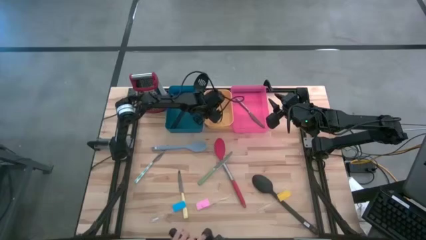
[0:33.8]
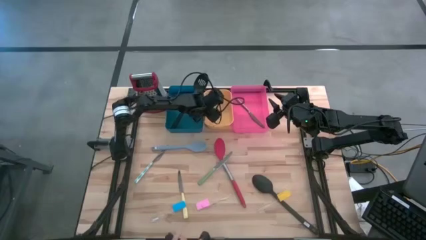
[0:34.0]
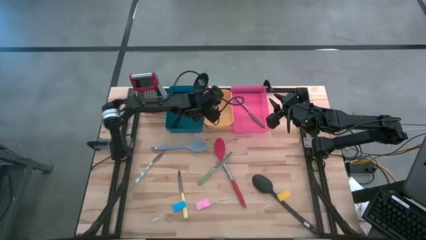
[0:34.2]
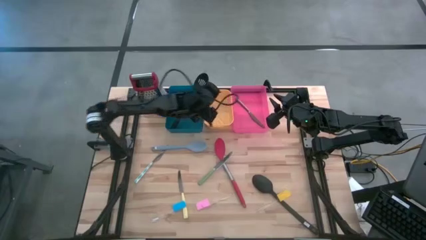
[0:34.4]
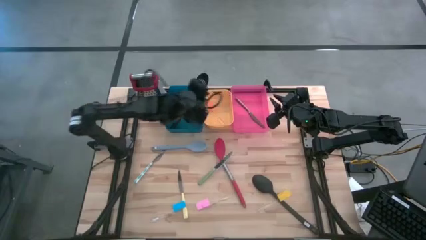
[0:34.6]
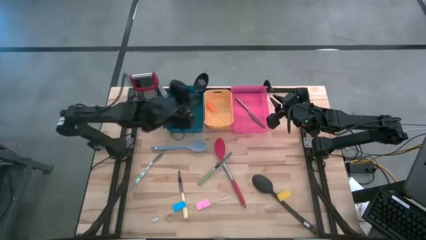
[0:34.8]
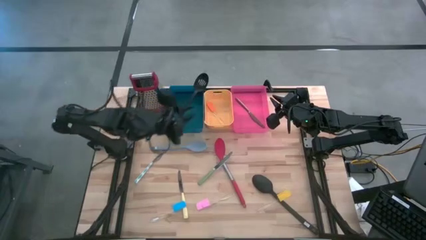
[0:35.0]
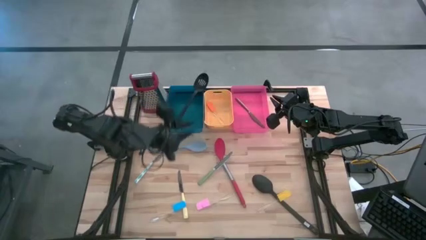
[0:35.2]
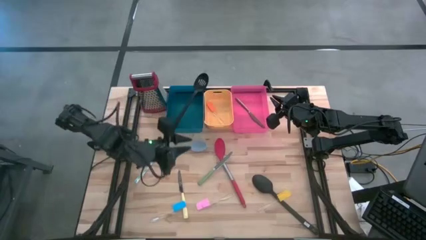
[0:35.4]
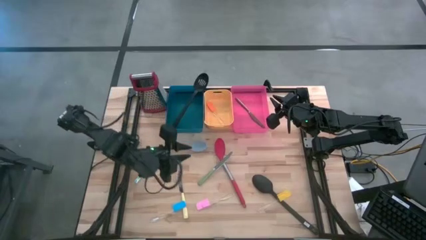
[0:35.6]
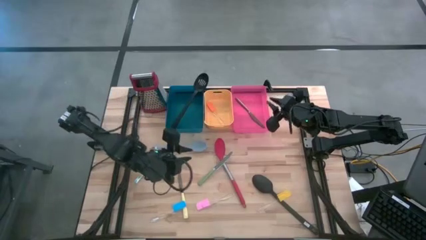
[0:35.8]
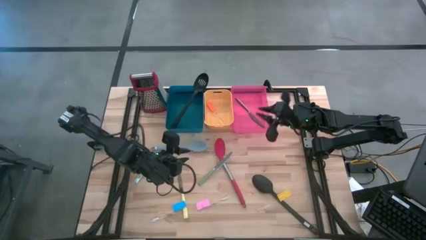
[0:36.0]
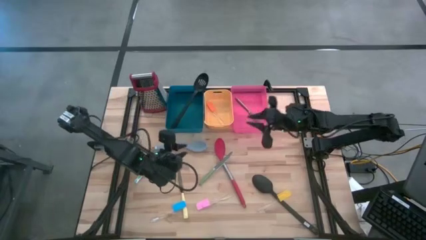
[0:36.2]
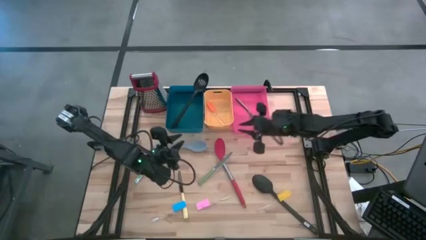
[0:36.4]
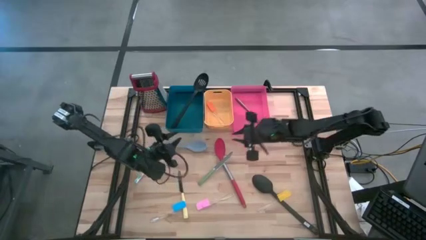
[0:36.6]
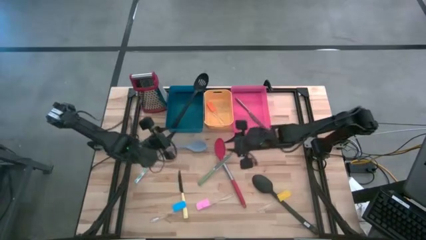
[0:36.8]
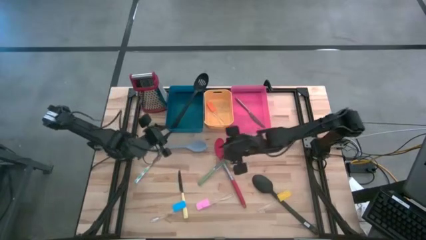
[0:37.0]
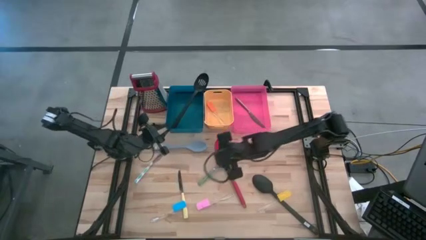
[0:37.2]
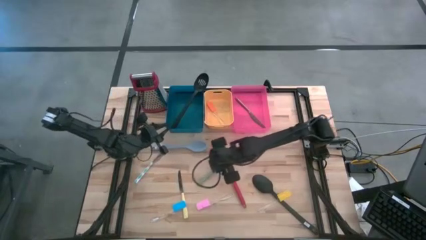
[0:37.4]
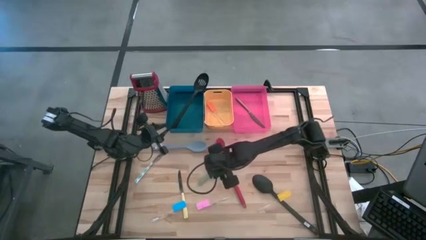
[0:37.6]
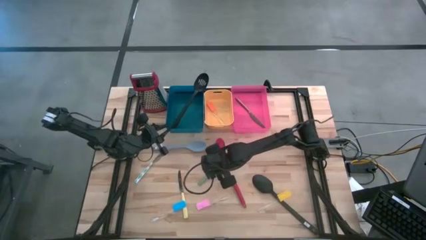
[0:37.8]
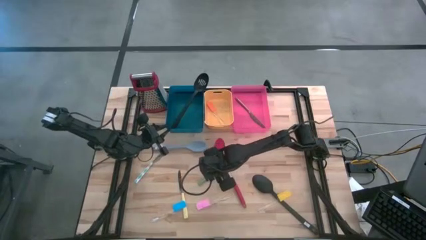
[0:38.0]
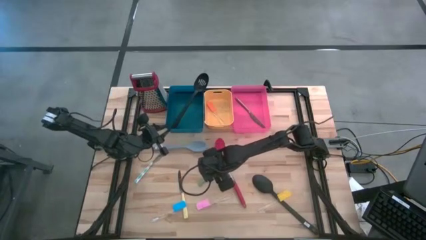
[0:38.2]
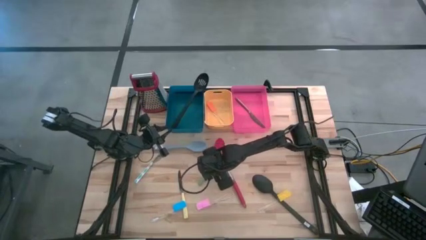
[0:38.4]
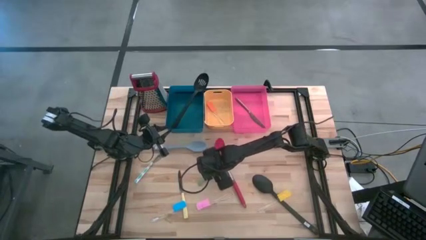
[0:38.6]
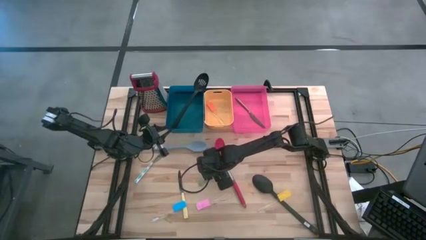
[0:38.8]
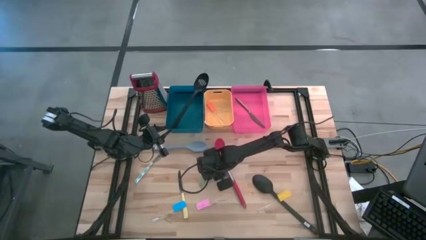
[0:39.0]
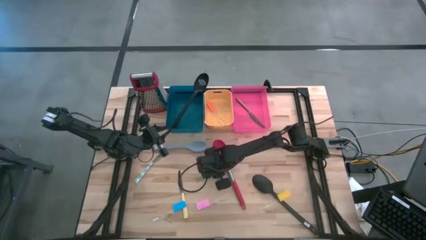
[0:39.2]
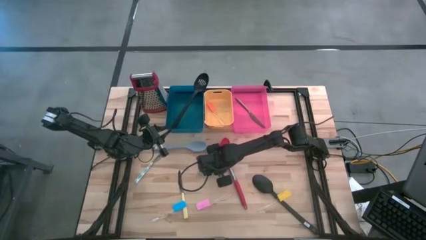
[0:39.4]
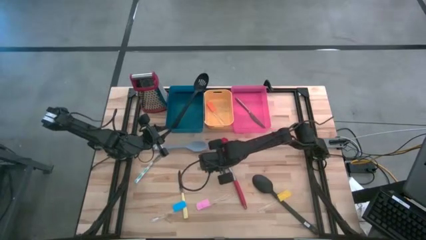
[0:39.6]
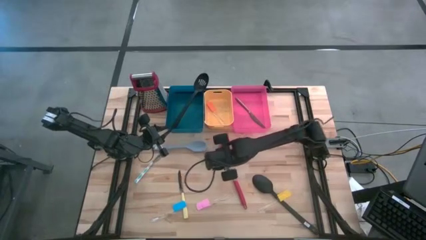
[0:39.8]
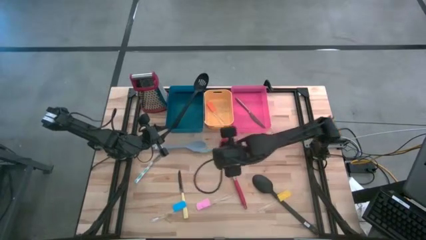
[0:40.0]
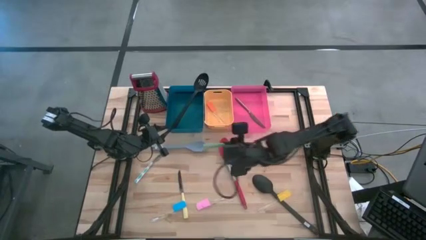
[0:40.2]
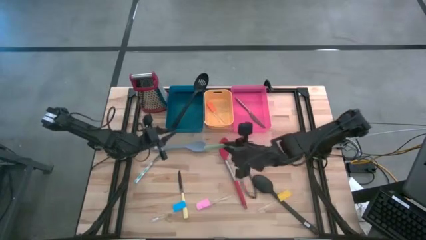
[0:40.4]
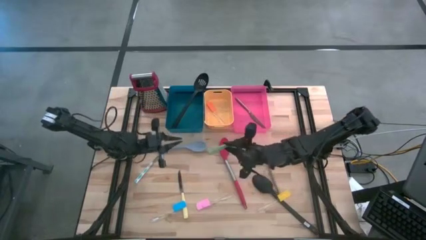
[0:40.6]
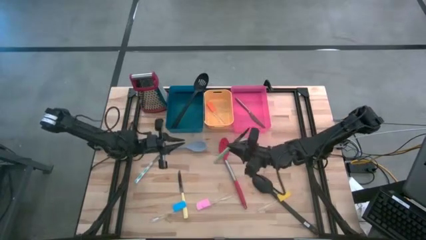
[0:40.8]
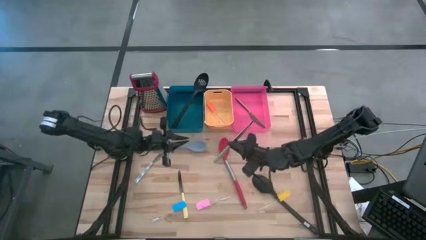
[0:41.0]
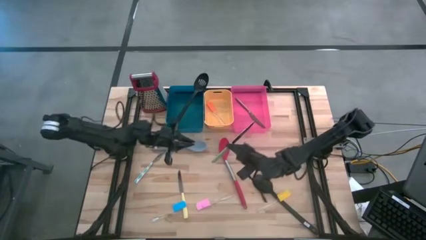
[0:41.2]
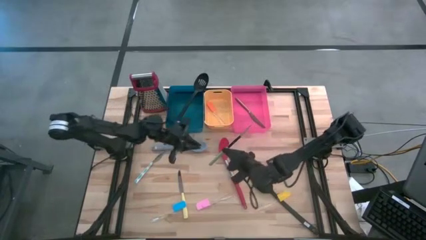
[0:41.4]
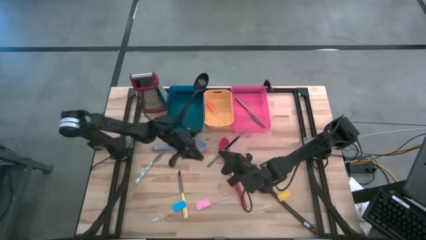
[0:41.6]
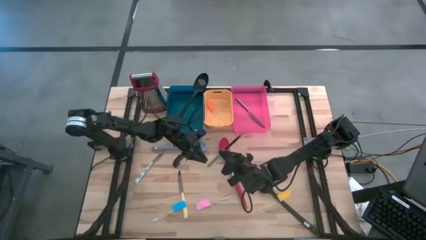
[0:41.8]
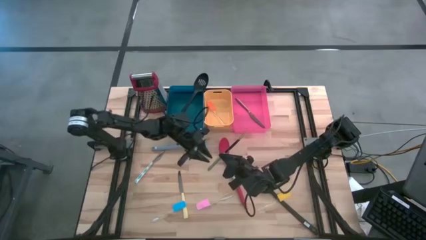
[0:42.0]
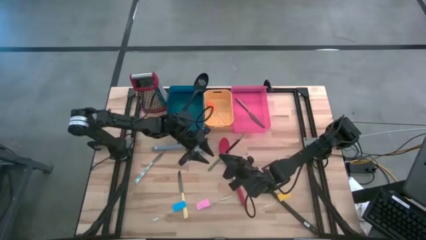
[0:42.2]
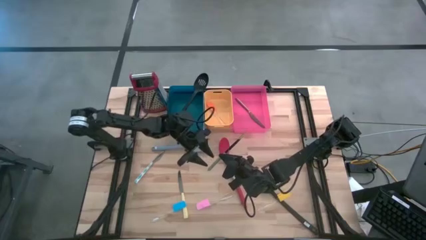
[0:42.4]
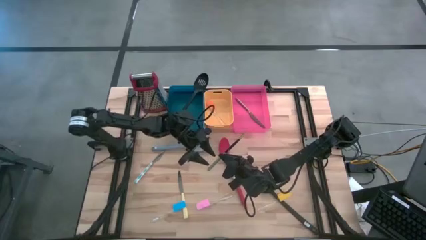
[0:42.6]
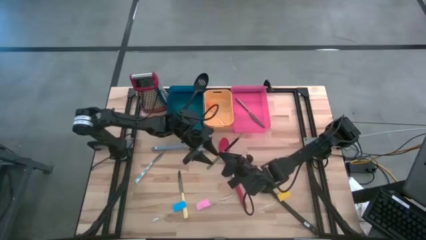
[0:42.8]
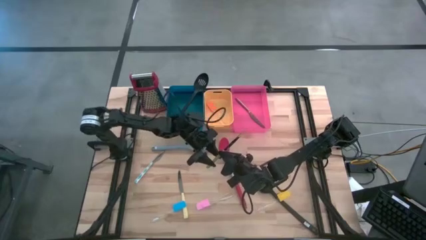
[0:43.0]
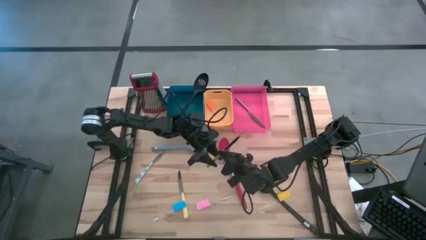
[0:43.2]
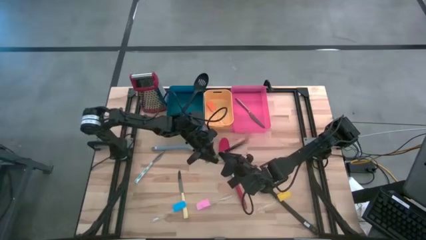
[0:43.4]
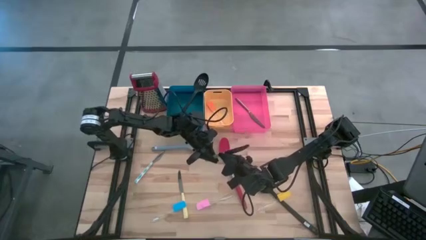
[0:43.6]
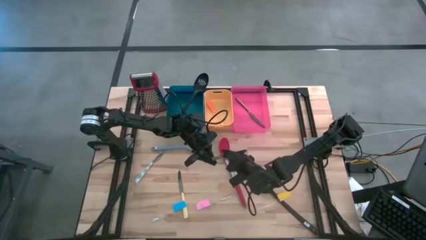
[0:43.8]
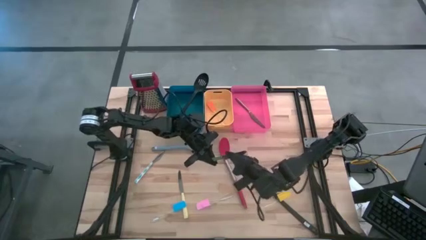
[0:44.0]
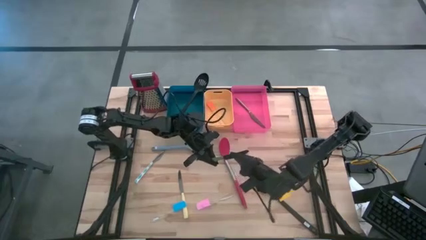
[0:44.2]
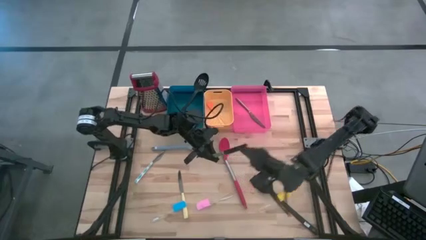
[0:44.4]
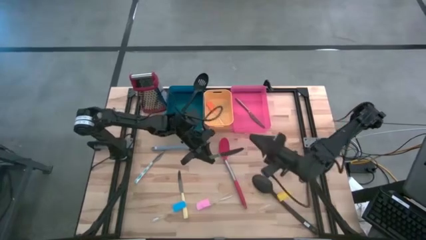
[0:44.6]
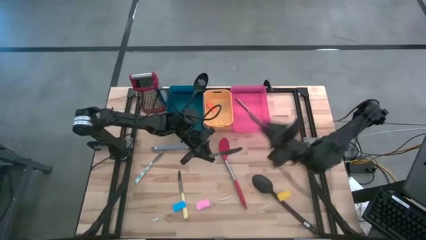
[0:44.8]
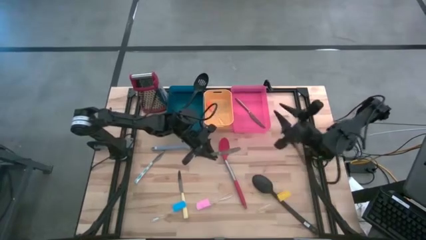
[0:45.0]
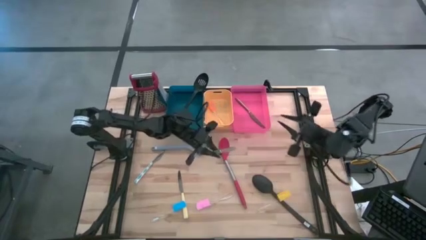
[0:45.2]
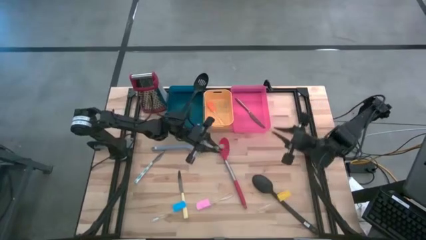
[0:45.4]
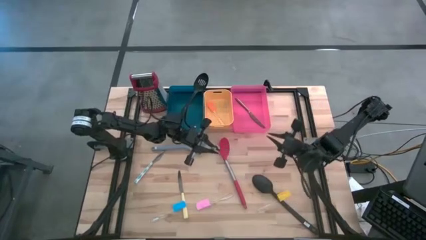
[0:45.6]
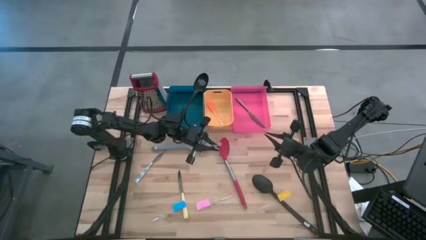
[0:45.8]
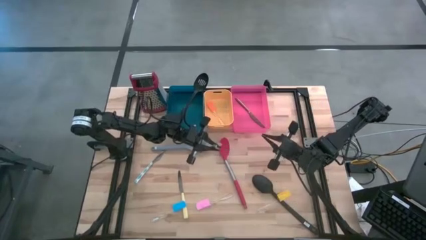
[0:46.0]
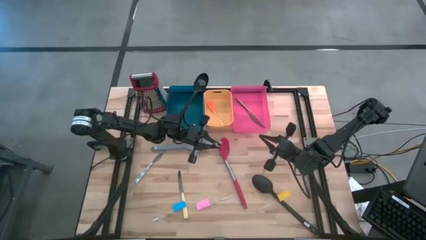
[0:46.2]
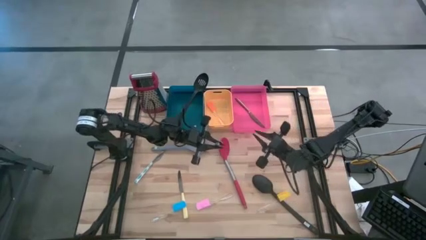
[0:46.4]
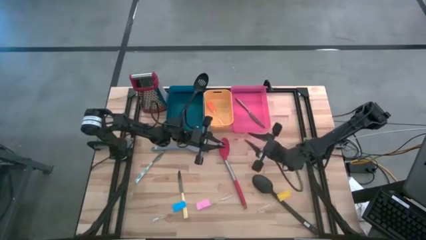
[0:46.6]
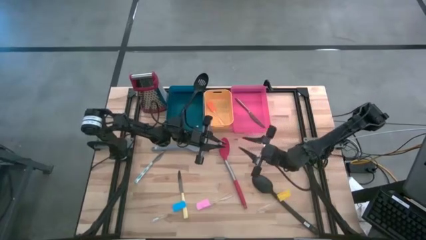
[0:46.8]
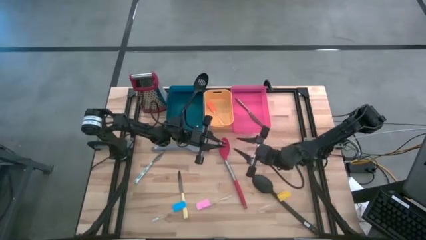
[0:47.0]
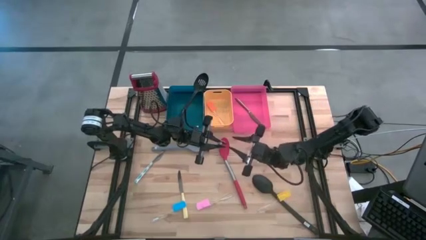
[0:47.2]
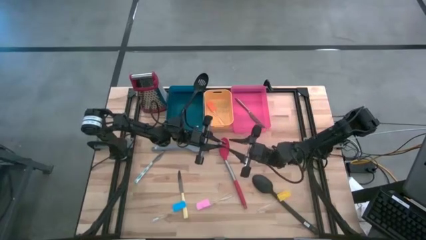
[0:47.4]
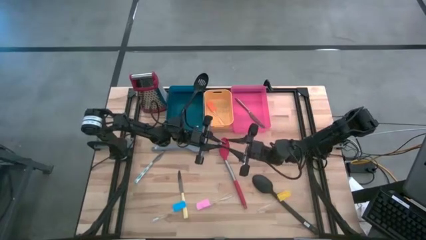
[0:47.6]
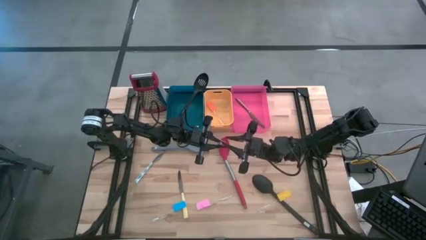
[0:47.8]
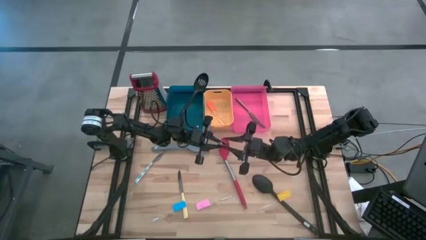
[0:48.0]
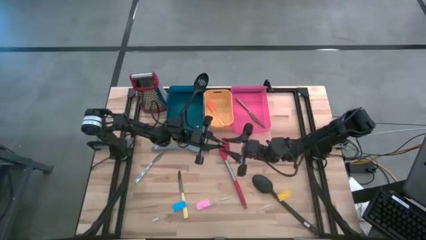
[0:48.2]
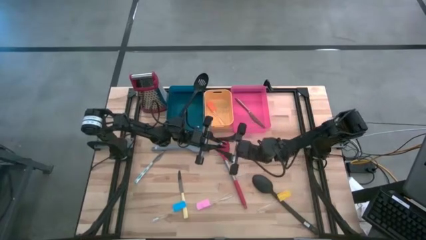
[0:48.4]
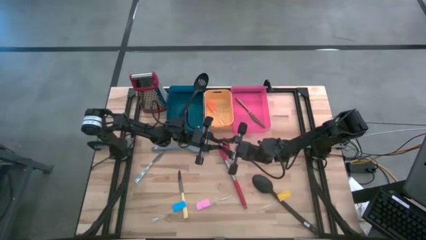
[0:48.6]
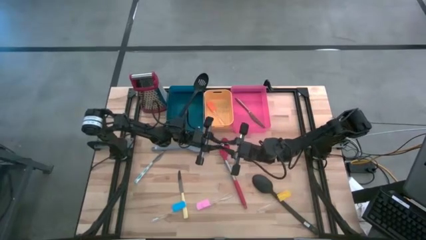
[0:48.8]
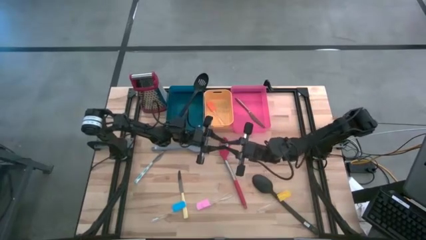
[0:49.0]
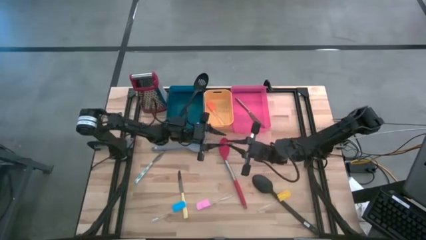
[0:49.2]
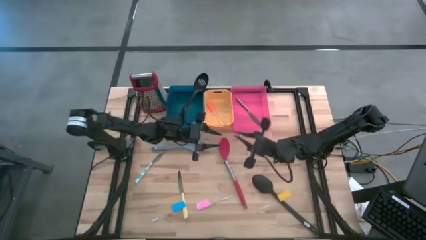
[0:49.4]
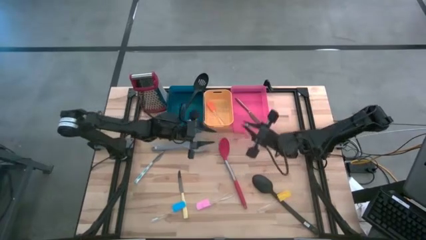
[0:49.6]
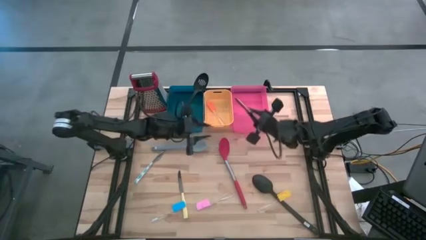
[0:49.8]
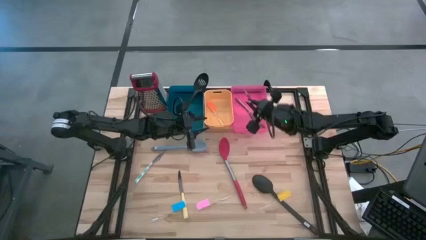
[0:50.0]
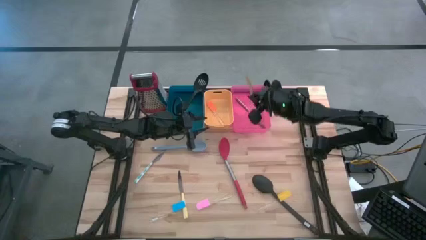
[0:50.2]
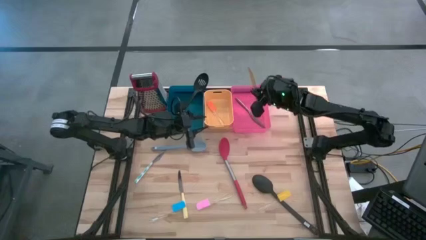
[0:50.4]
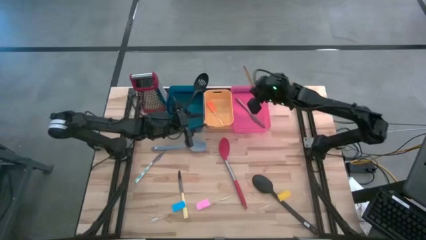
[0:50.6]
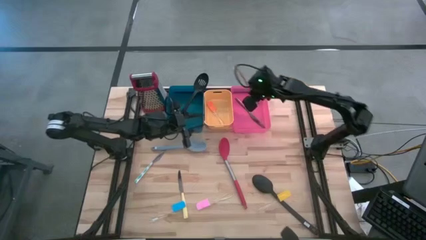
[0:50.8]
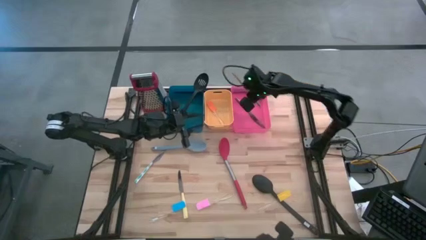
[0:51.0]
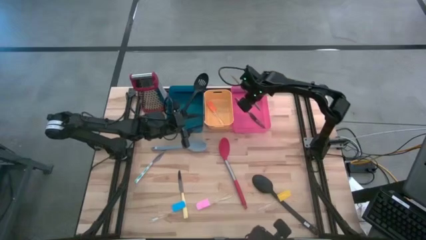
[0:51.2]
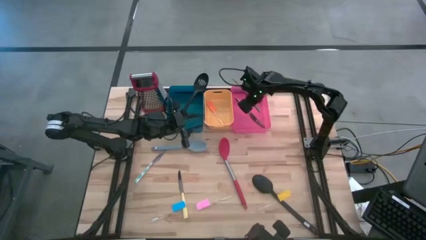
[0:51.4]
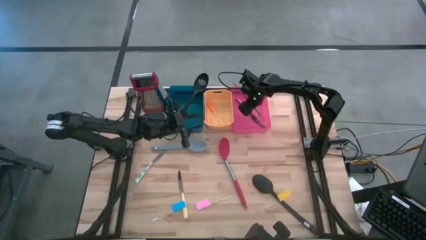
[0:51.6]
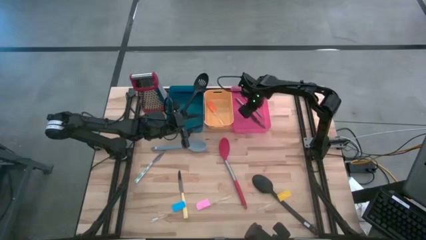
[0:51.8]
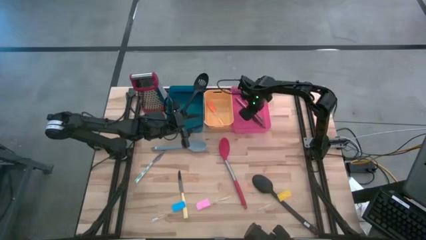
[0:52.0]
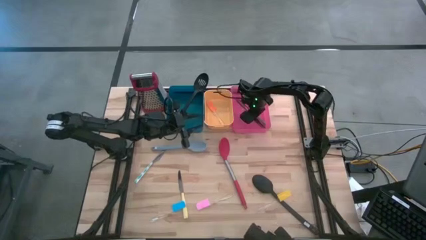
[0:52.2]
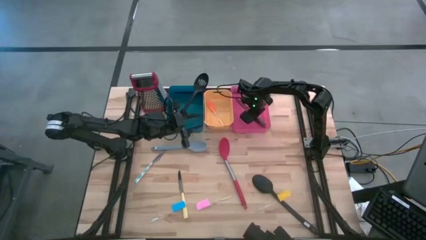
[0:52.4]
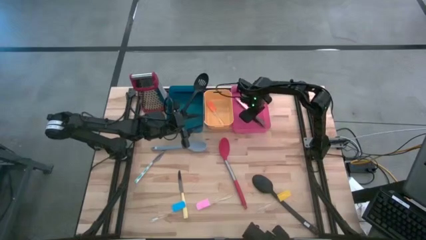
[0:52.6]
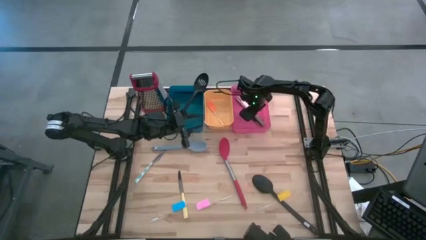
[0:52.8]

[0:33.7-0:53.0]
Task: Pick & Place Kitchen Items
Put the green knife into the red bin
